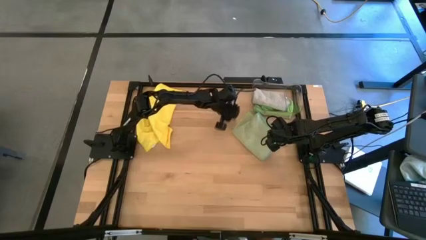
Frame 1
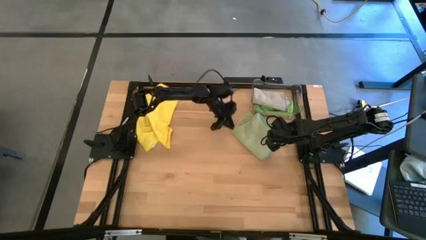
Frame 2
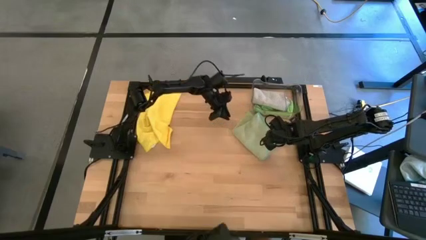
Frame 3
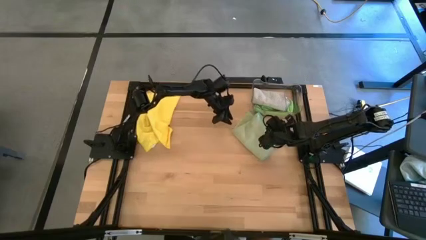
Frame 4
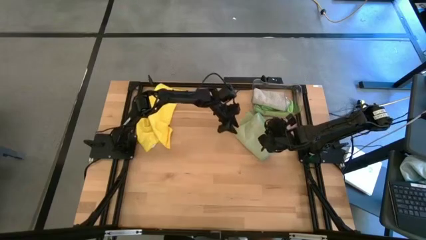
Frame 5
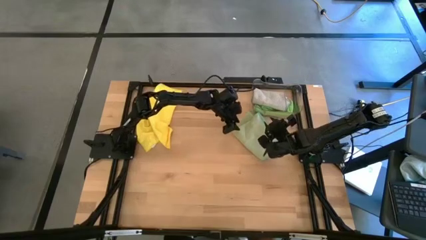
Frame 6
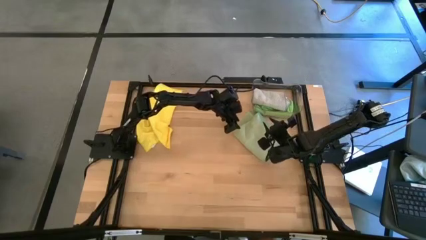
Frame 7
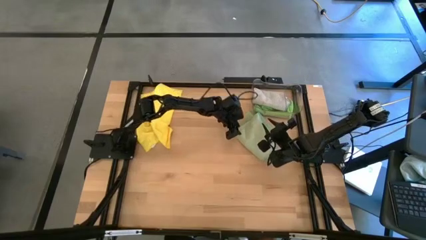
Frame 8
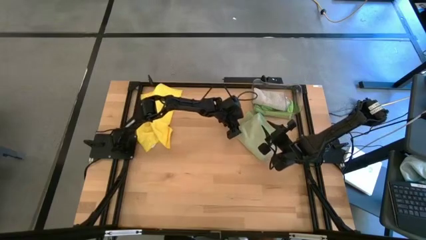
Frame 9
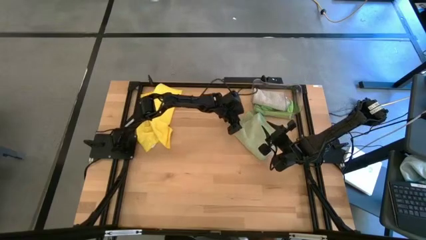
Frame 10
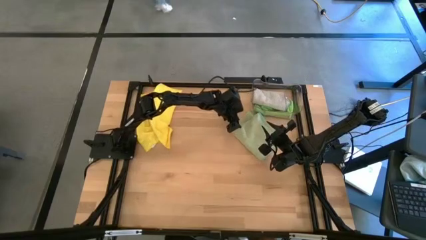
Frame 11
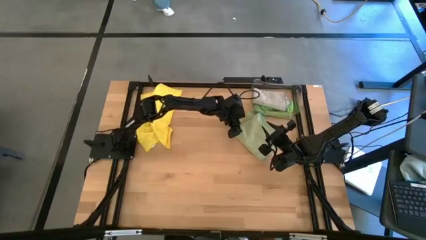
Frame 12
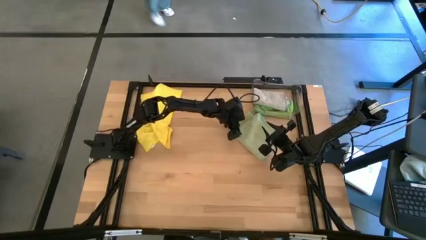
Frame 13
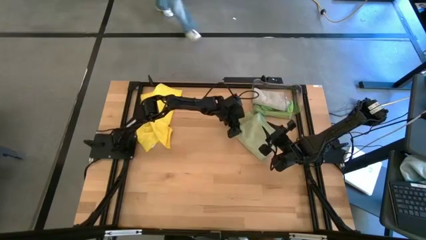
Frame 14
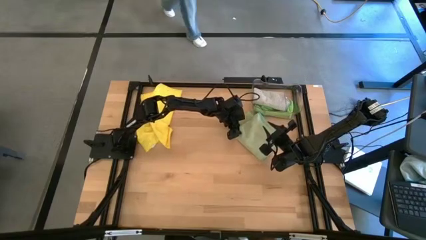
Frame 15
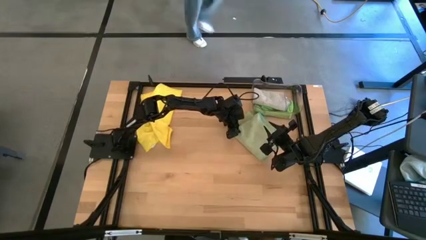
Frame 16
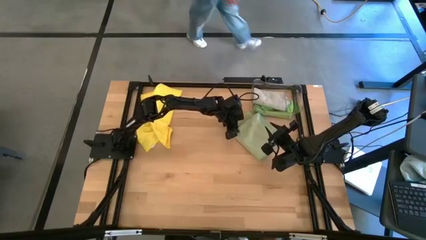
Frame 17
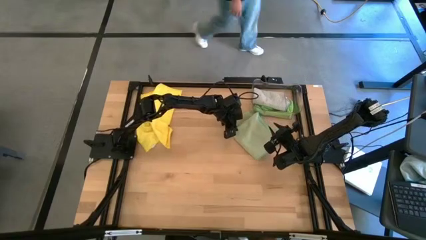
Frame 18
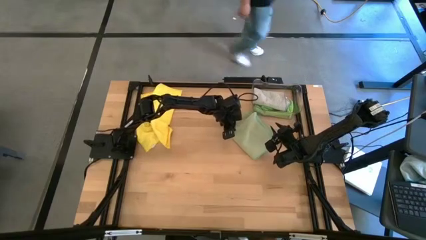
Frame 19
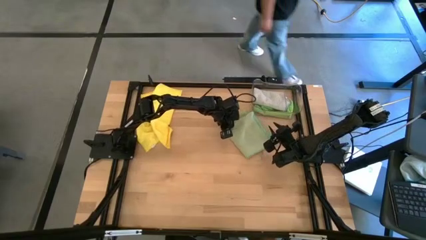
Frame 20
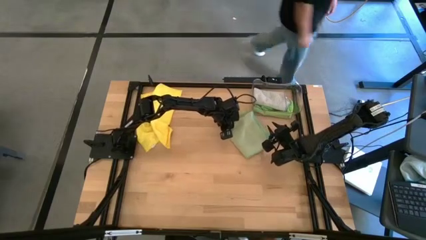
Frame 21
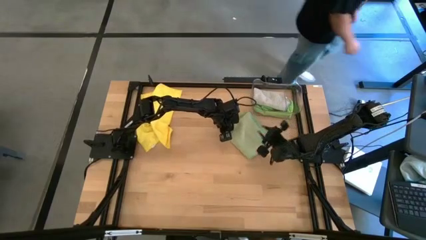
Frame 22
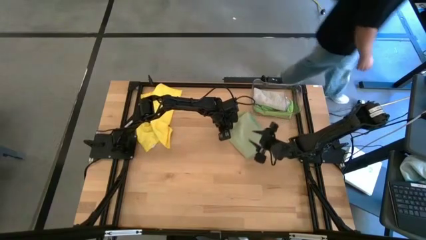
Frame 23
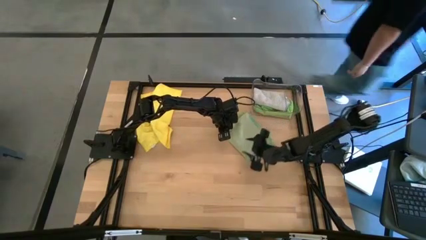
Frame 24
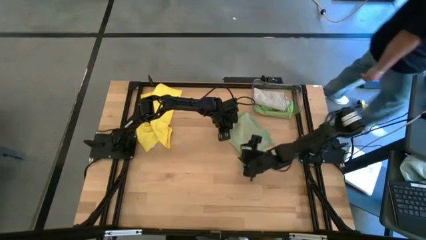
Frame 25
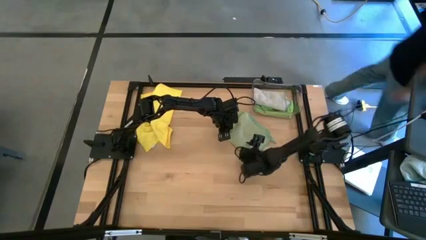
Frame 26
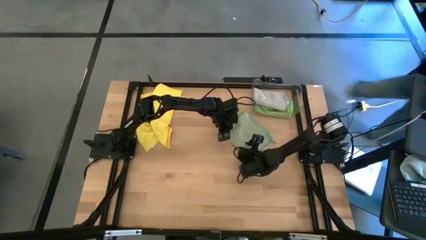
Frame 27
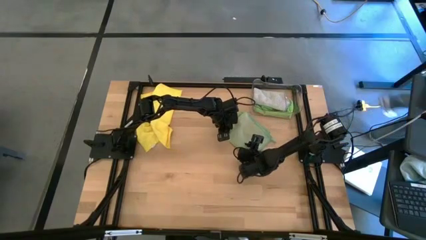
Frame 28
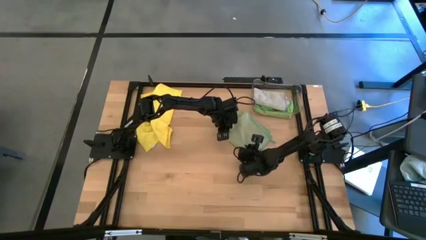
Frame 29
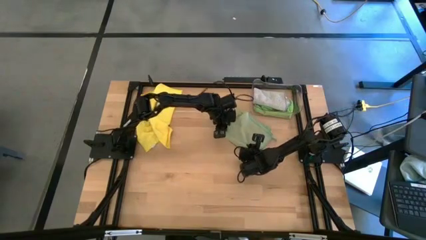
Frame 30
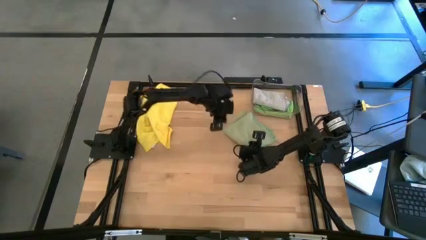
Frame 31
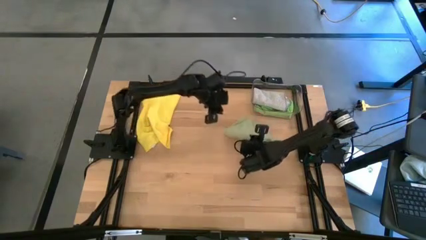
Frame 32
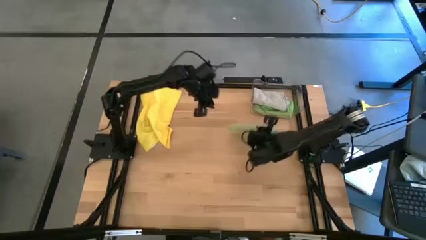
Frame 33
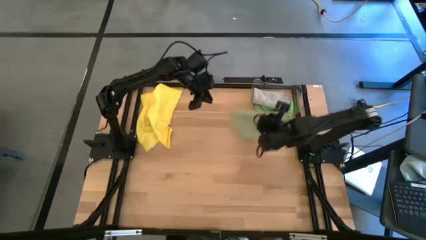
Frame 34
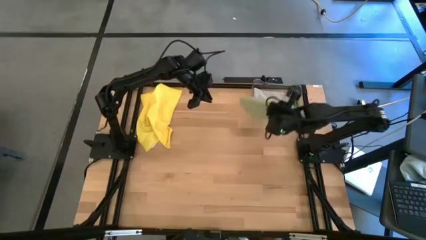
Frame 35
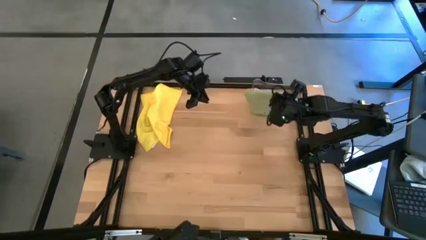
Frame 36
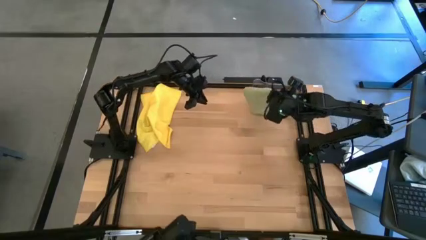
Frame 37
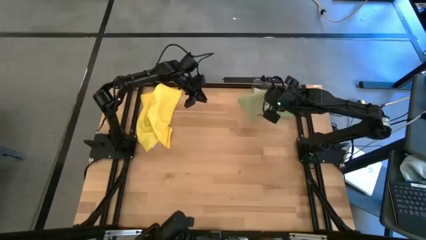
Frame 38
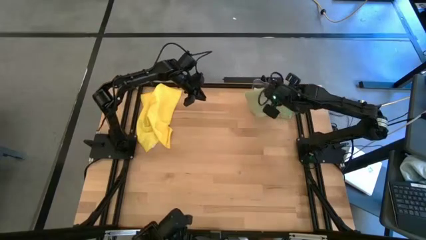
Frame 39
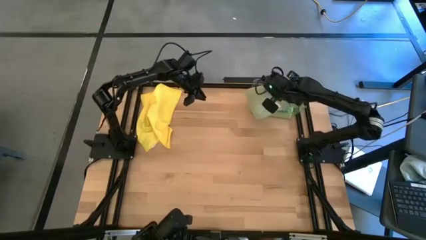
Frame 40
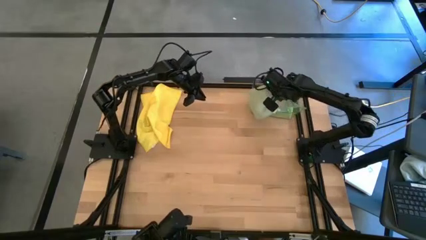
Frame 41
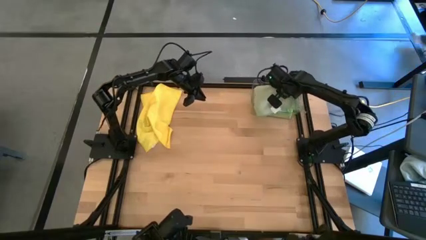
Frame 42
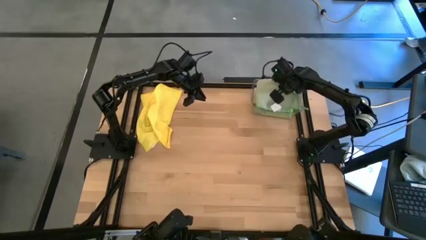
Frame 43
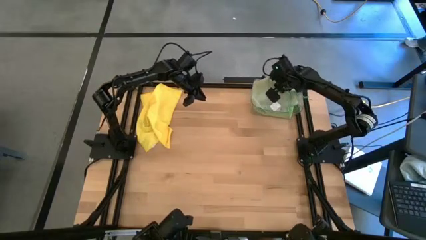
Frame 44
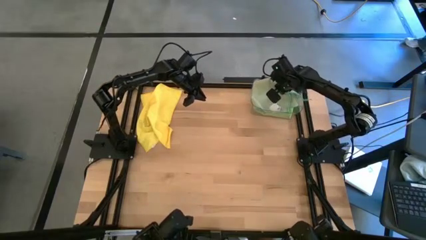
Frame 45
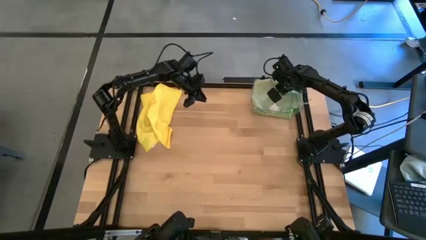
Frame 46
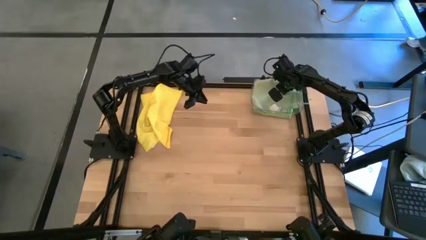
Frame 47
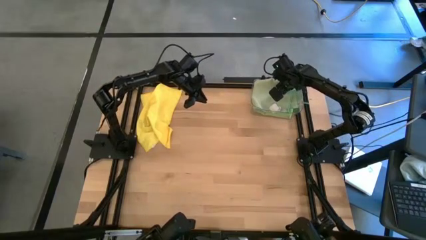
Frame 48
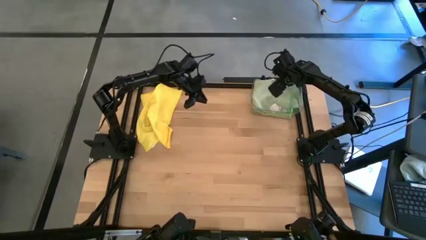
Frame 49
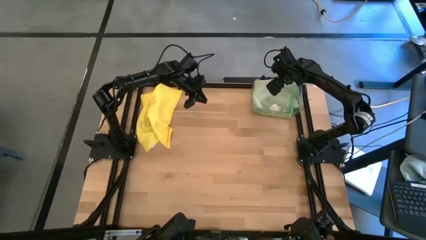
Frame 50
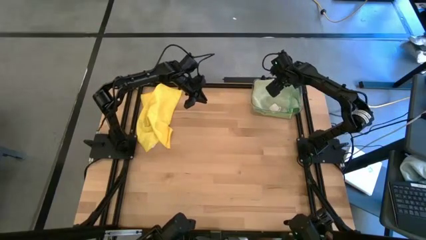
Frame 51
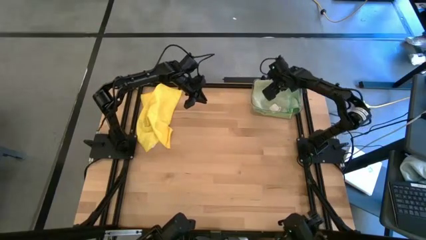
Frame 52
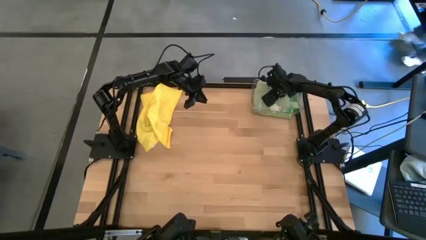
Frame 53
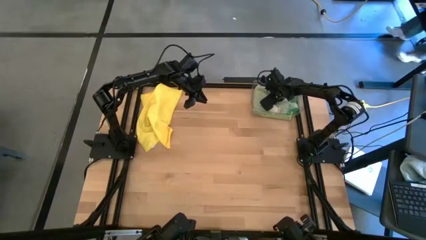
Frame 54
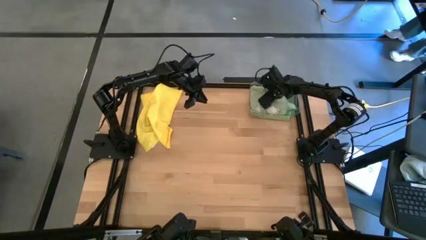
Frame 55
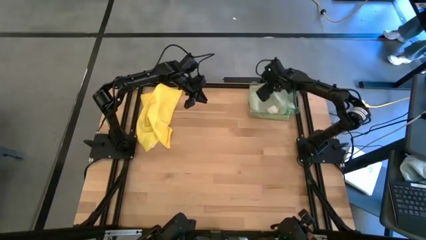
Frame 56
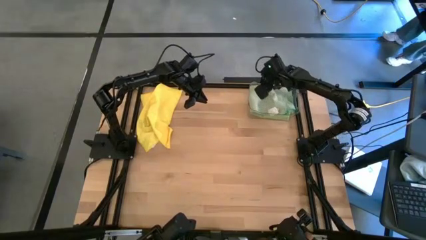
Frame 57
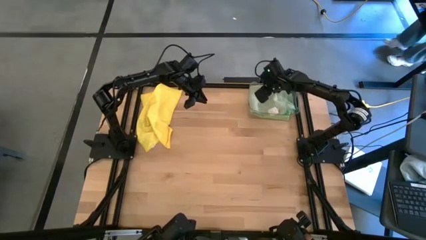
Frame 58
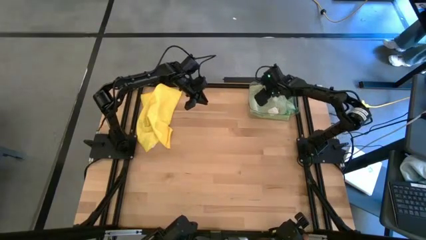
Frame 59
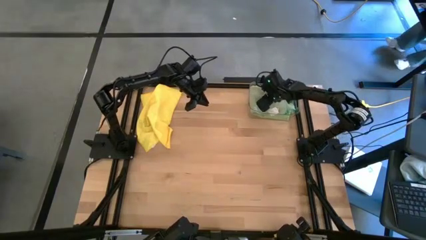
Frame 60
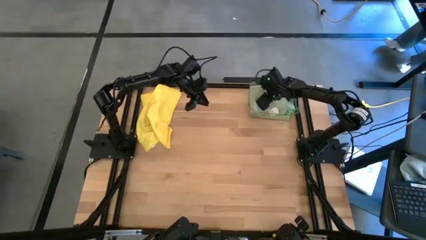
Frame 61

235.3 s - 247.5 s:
Task: Fold microfiber towels
Put the light green cloth into the transparent bin

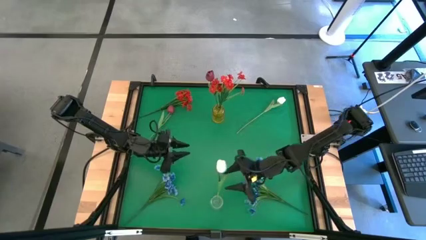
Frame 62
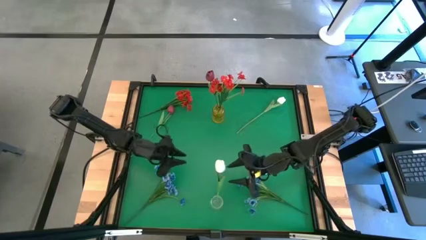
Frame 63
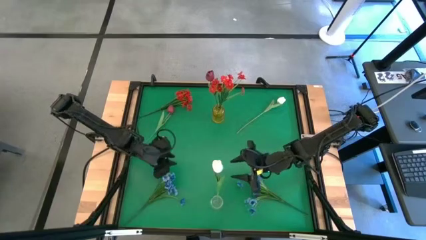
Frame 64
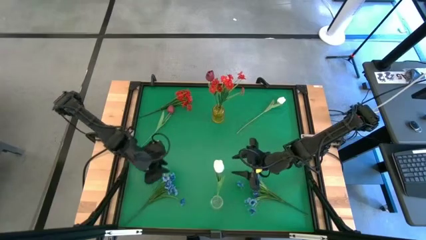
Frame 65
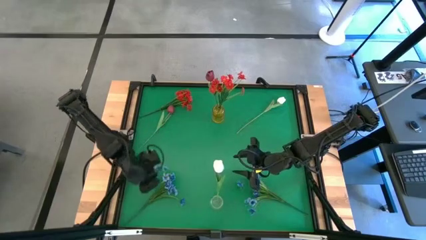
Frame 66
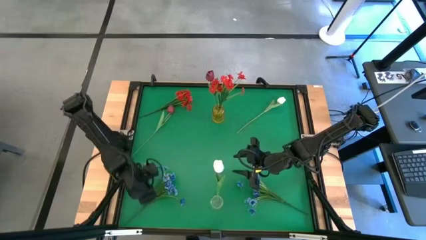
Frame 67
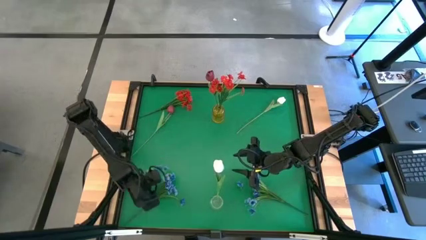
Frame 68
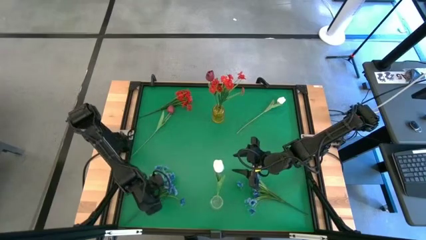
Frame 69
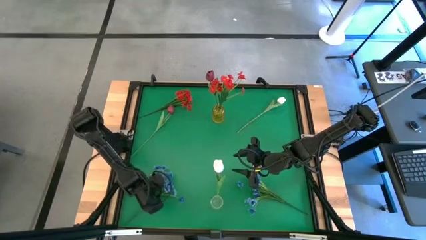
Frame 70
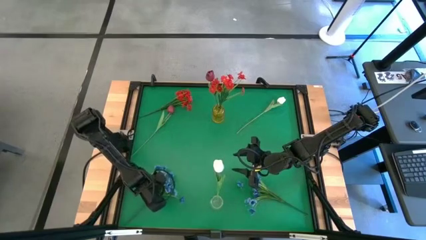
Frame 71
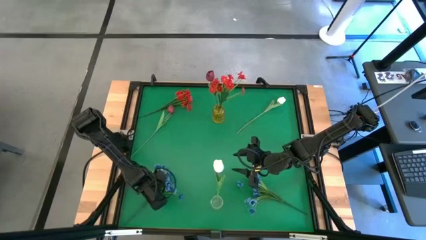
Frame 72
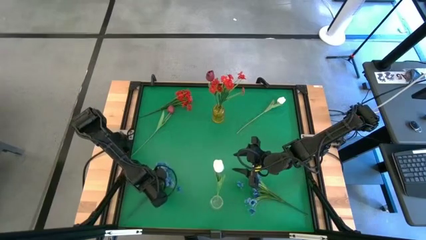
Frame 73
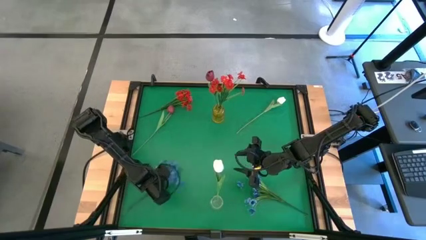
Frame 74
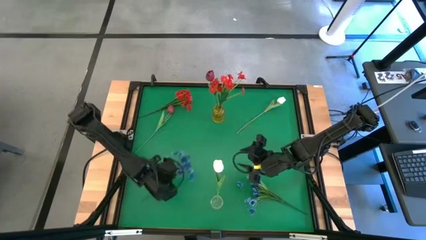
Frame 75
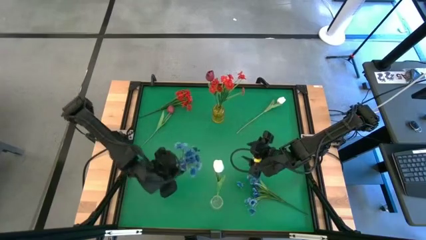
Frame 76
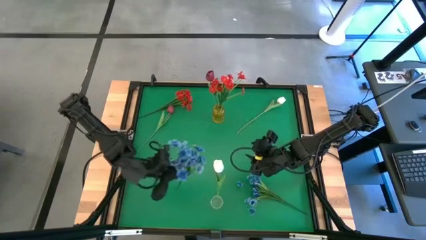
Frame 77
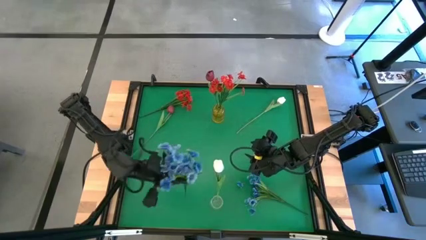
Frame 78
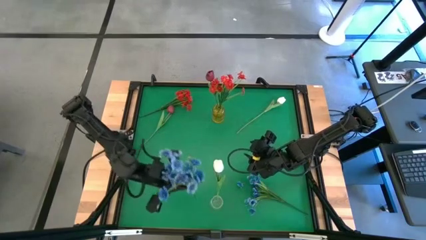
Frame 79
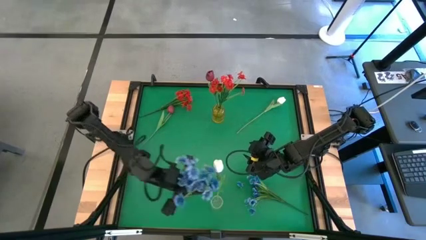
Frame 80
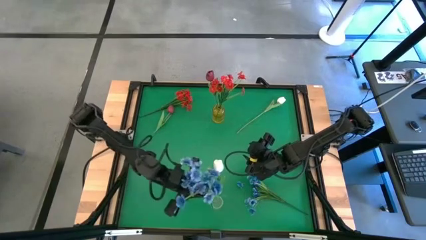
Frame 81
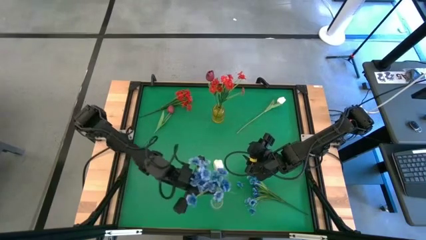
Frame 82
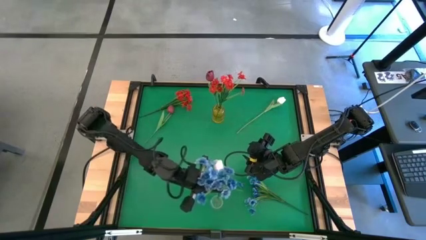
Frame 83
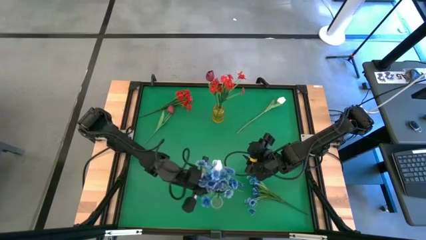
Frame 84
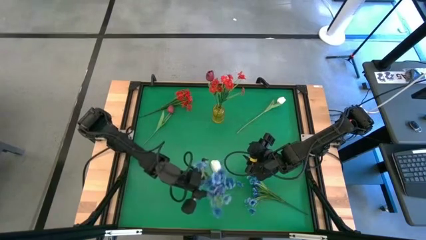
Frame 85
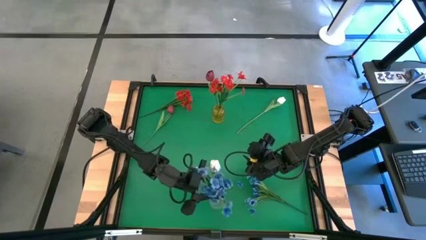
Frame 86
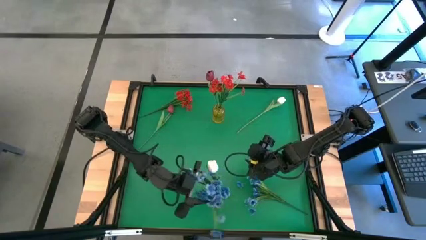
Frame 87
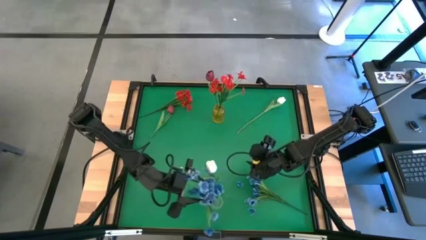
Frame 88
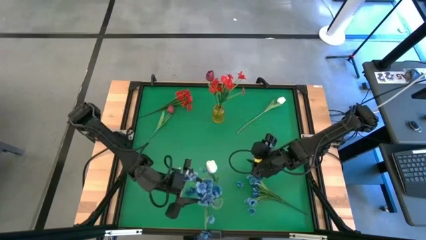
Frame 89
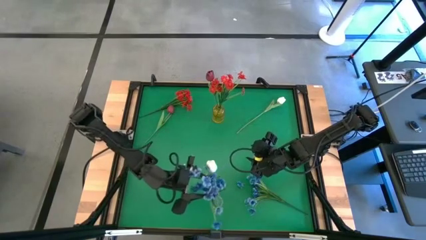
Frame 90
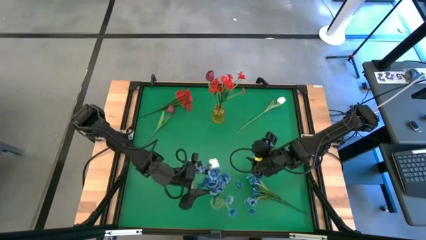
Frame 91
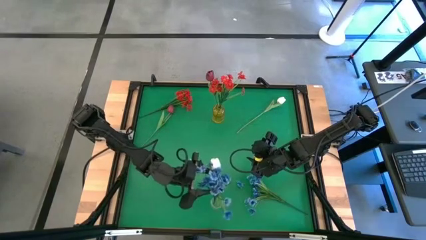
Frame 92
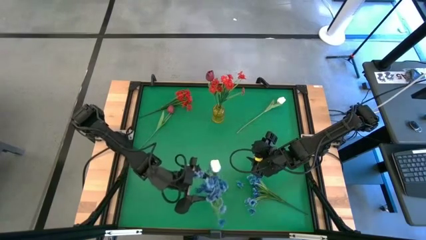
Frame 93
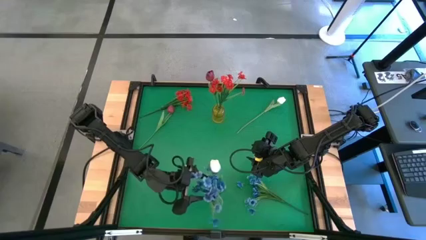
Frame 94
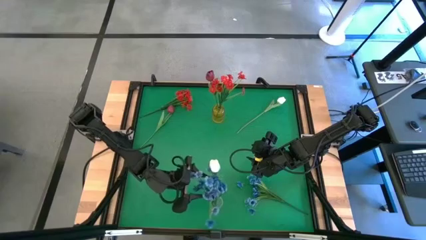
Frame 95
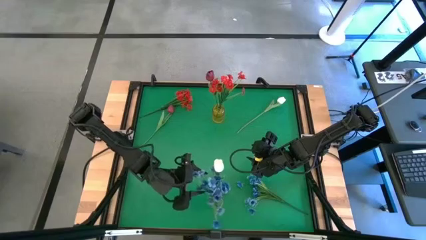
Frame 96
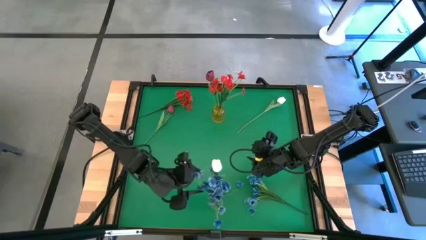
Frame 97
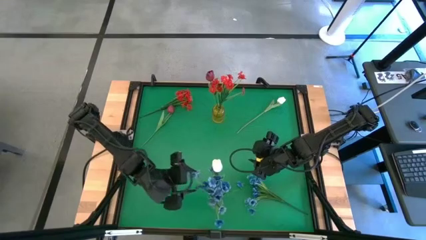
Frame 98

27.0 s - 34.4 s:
Task: Sort flowers into vase by color
Put the left blue flowers into the transparent vase
